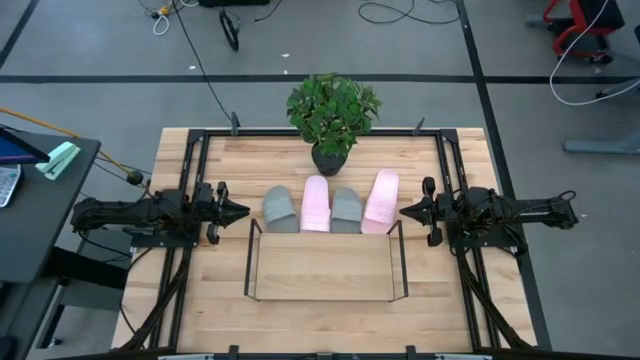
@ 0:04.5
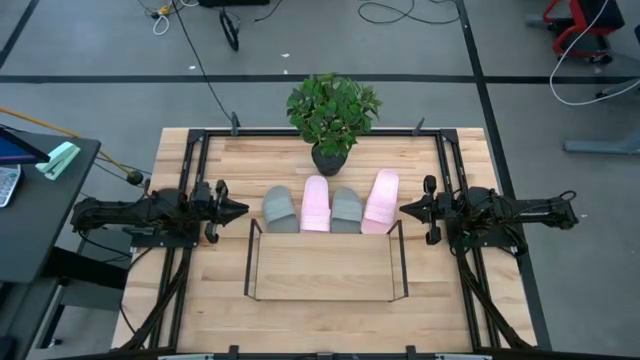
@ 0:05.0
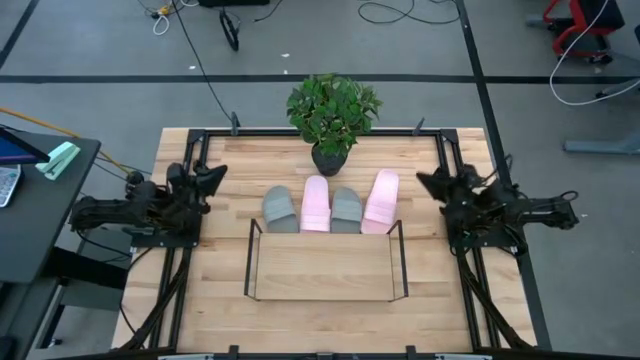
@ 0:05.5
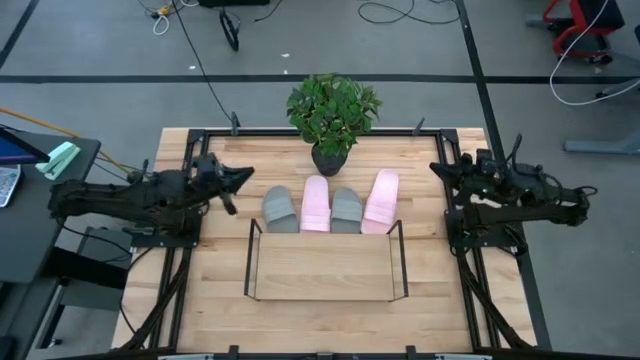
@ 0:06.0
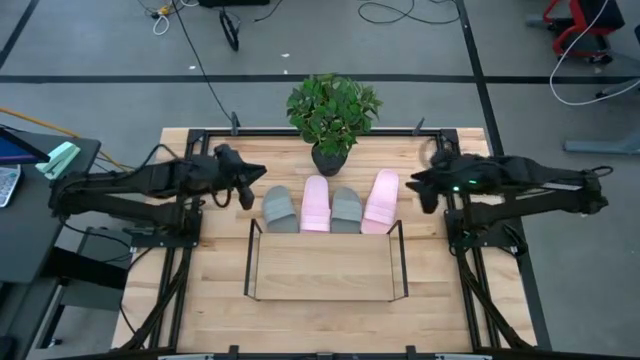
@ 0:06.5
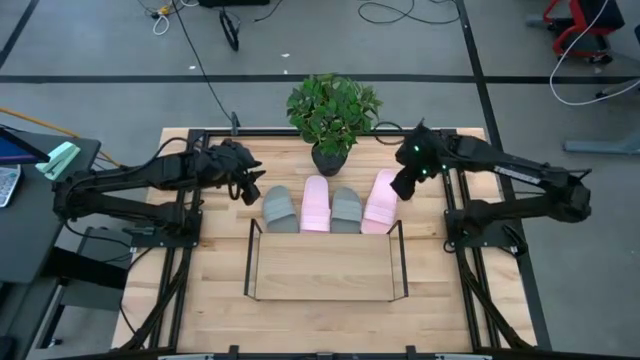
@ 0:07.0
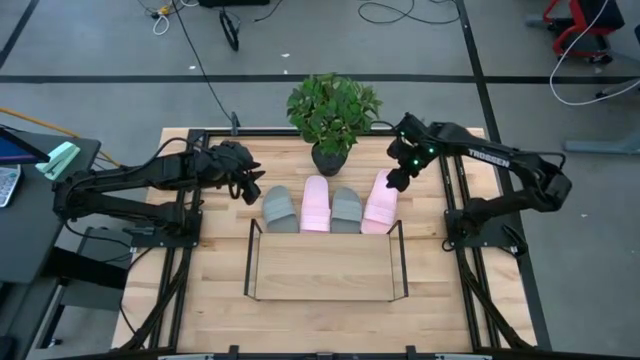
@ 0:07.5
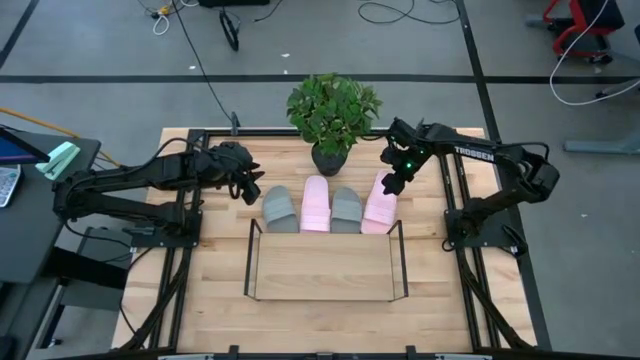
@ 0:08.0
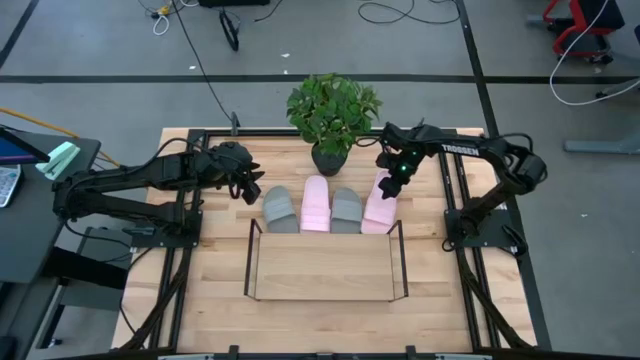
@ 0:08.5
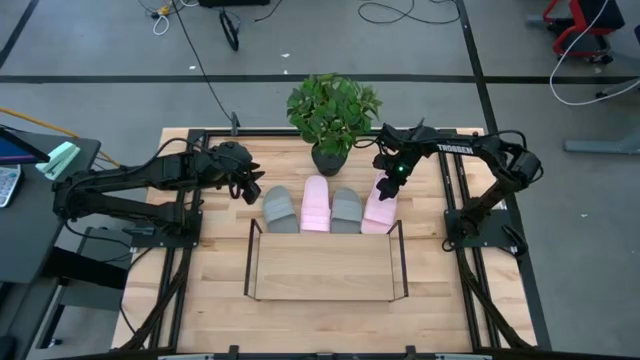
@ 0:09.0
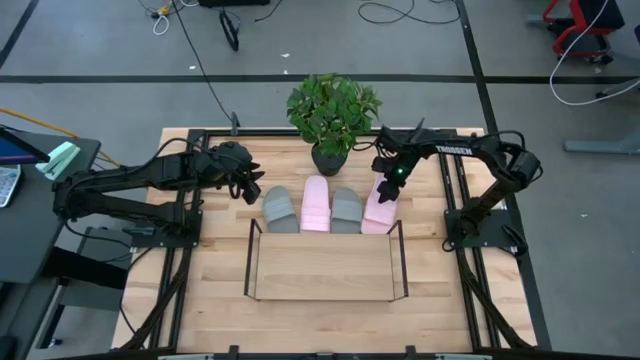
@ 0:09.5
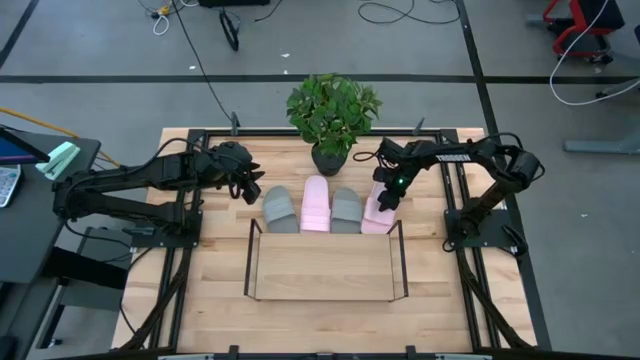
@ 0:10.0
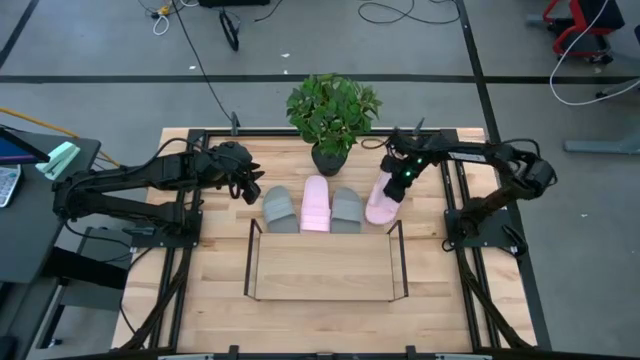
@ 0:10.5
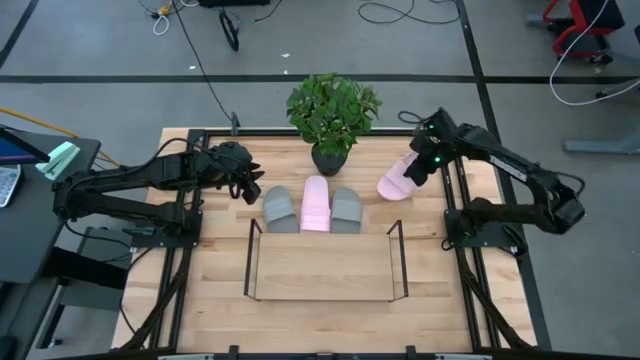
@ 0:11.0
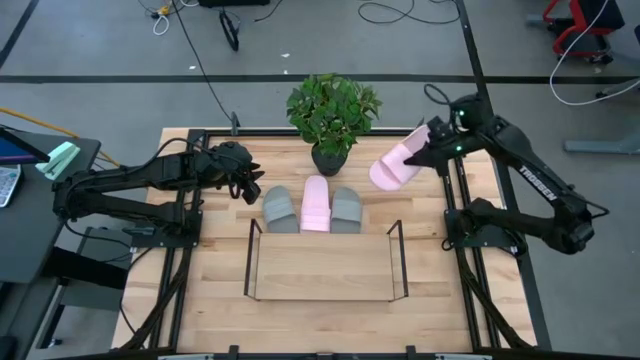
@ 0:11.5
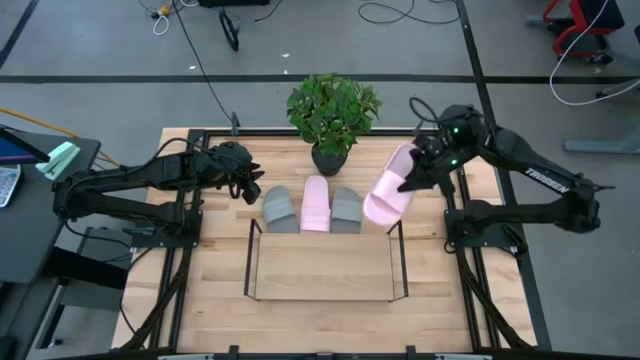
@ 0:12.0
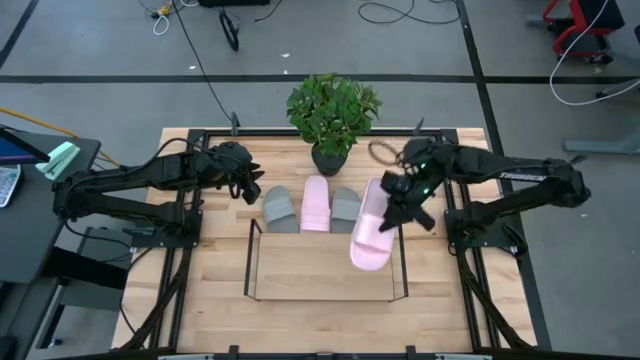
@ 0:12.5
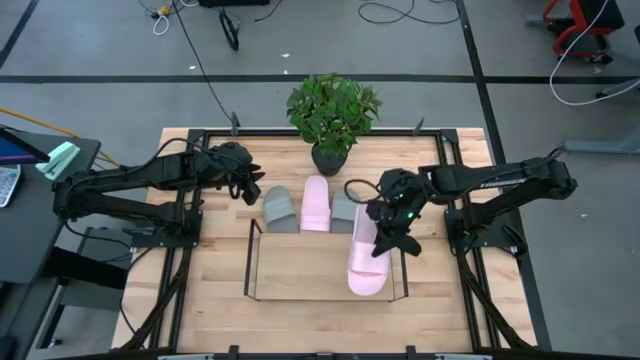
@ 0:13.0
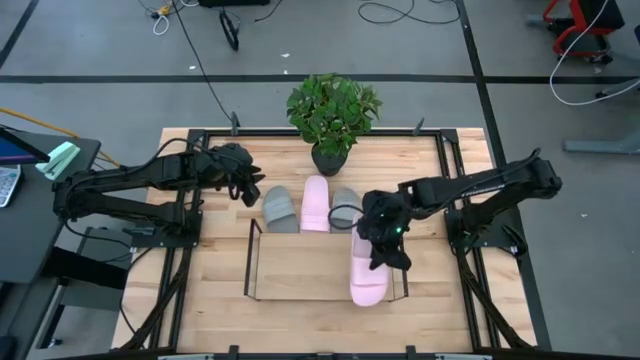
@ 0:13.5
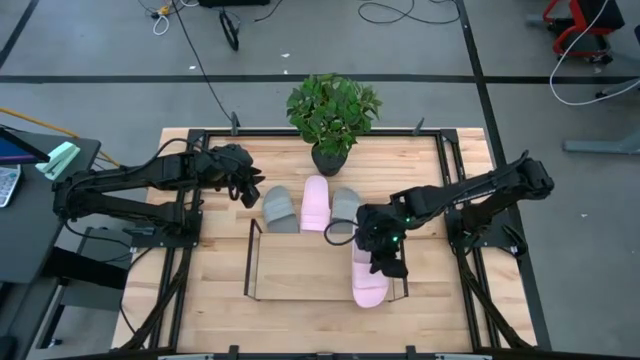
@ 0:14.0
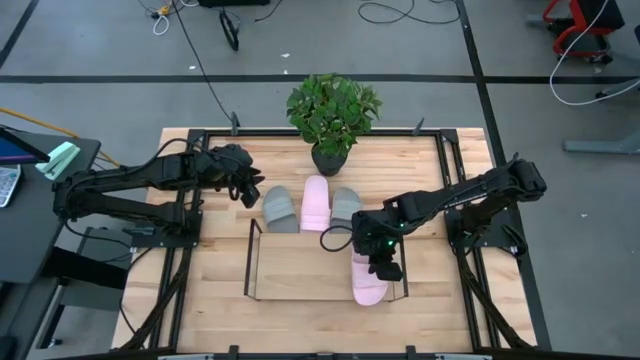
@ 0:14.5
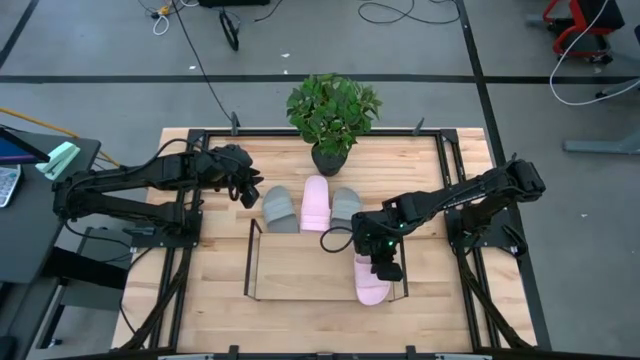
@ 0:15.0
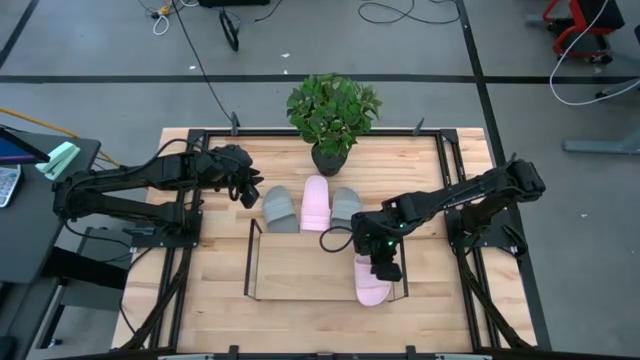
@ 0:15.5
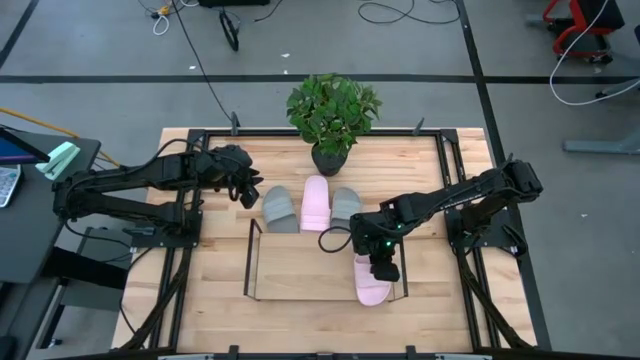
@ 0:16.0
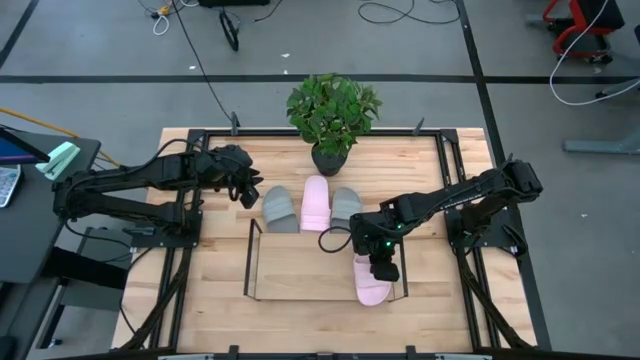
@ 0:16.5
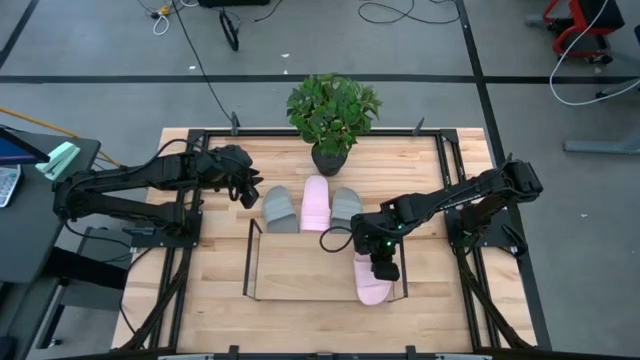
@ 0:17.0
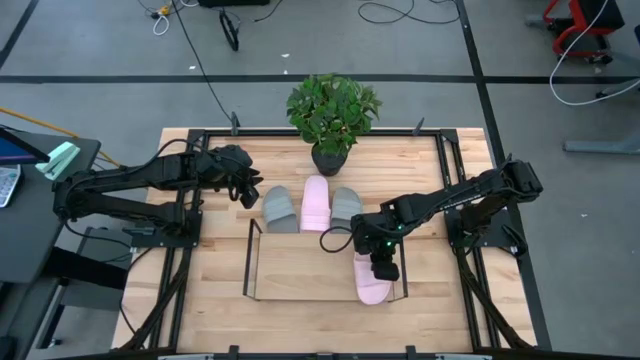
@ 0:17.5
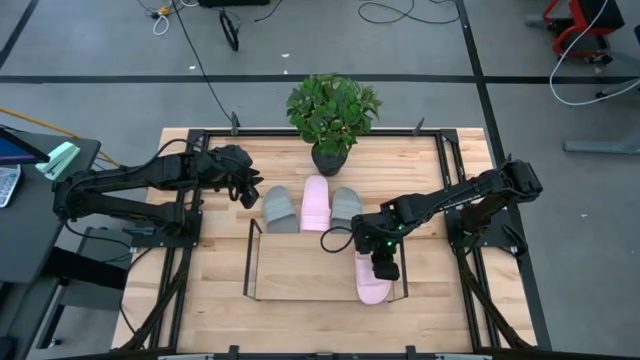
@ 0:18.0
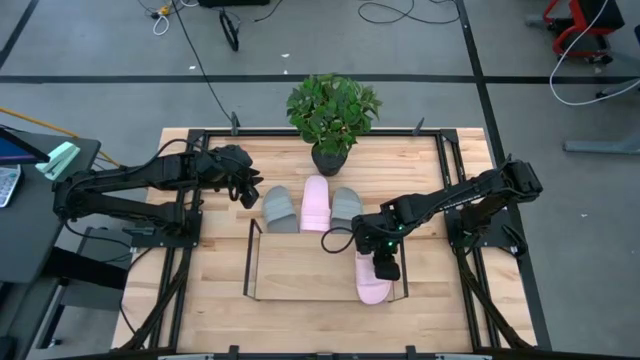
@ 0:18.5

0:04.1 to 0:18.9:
Task: Pick and place slides into the shelf
Put the right pink slipper on the shelf

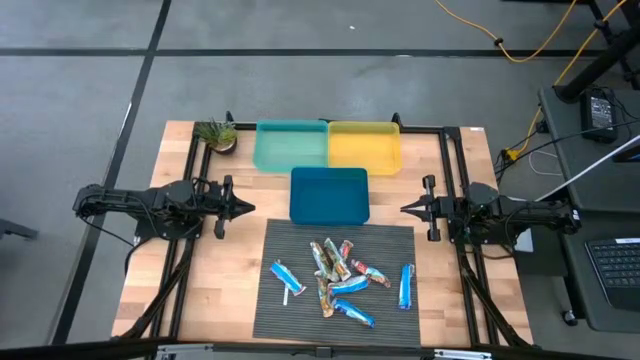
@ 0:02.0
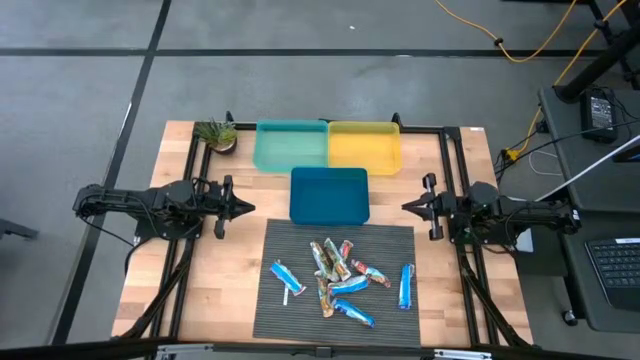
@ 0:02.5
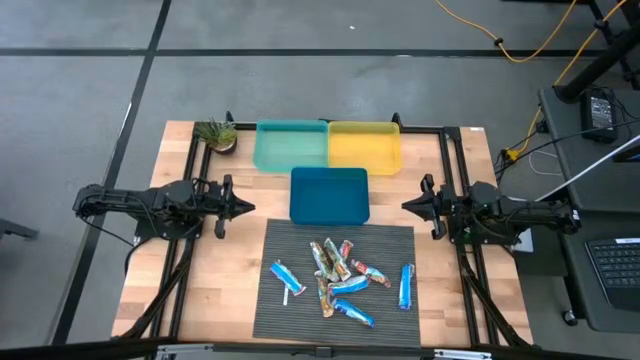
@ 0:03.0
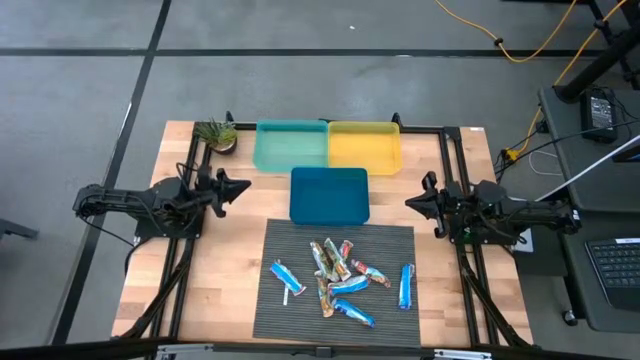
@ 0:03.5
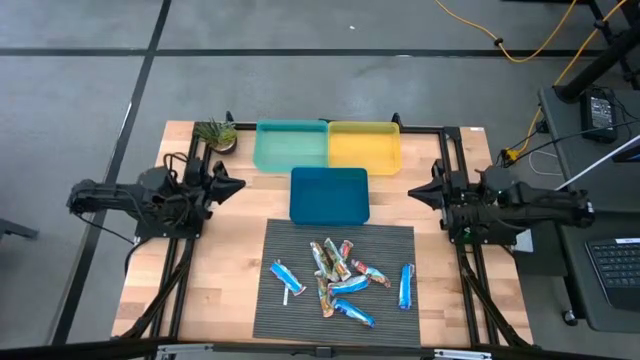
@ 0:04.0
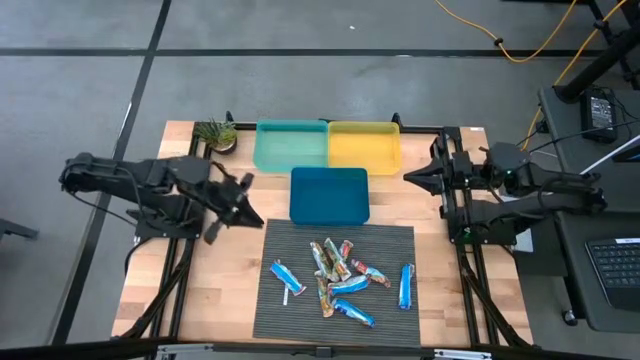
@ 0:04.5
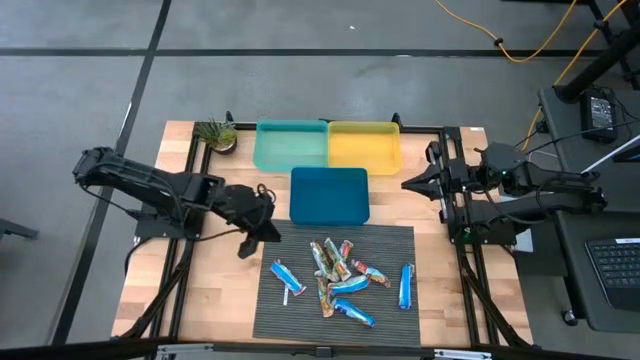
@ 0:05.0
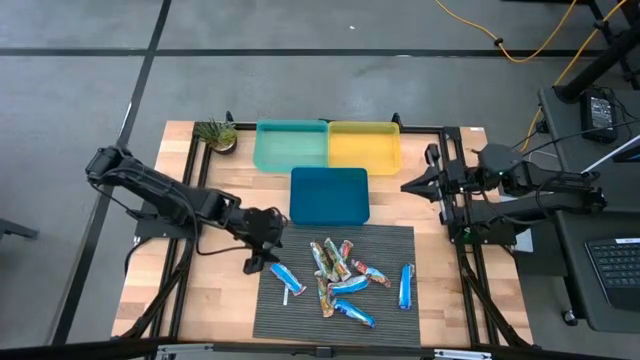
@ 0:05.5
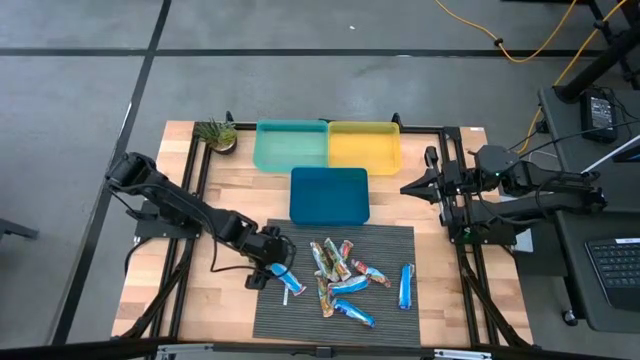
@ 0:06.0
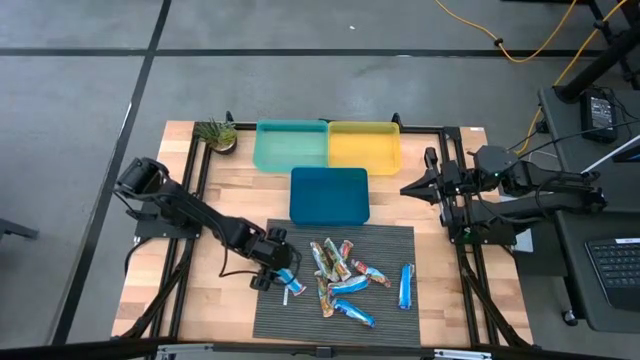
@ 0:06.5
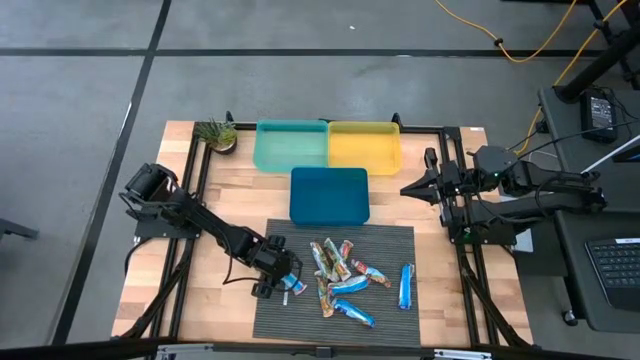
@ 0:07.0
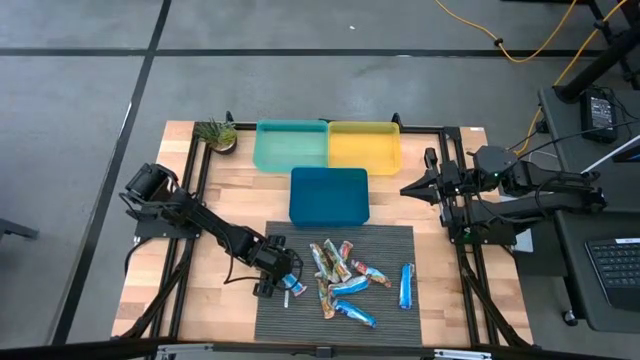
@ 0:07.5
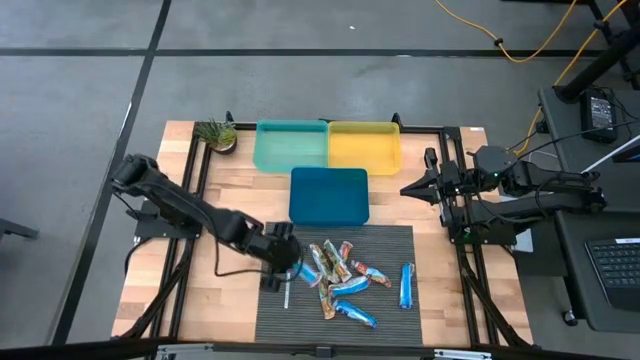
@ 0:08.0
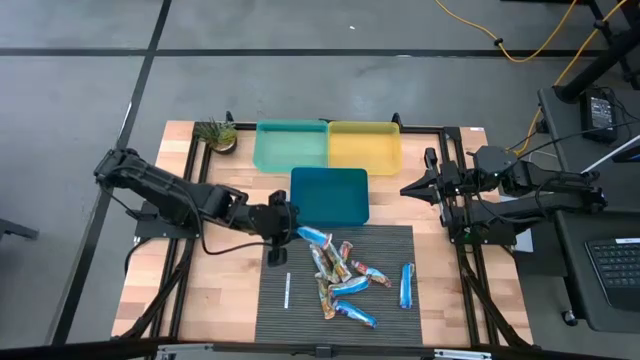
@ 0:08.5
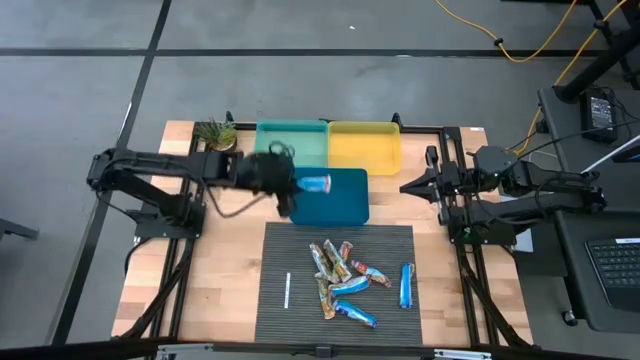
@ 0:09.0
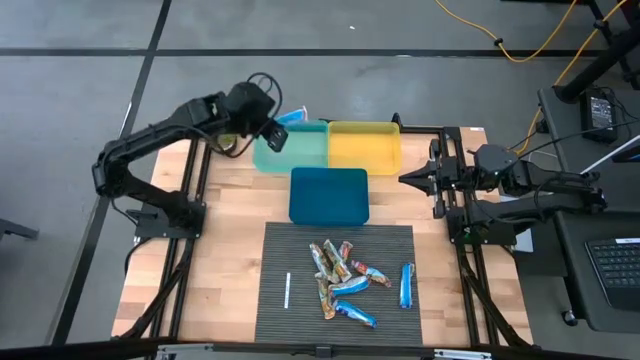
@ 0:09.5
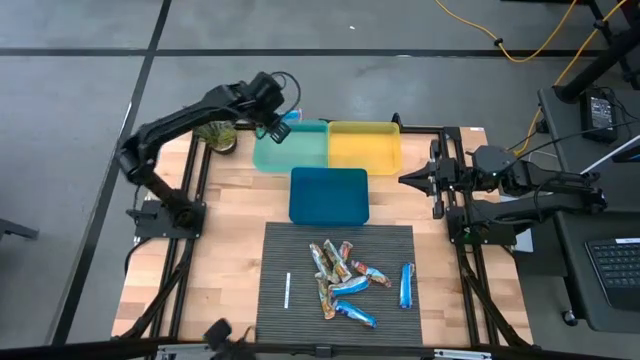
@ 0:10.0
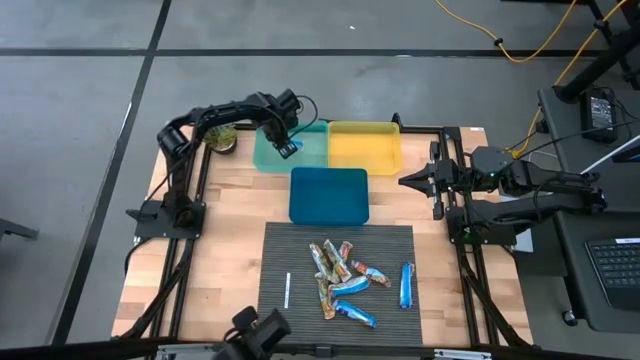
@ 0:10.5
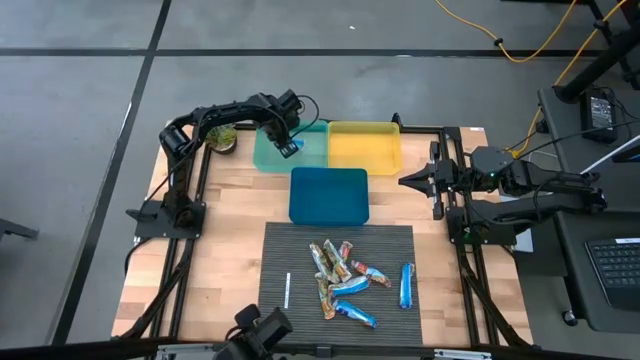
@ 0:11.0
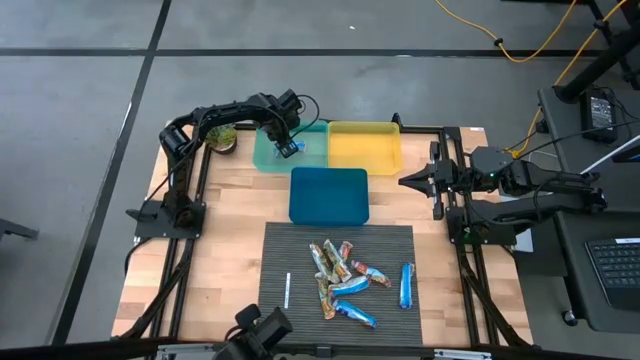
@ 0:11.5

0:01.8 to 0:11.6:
Task: Pick and place Granola Bars by type
Put the red granola bar into the green bin
